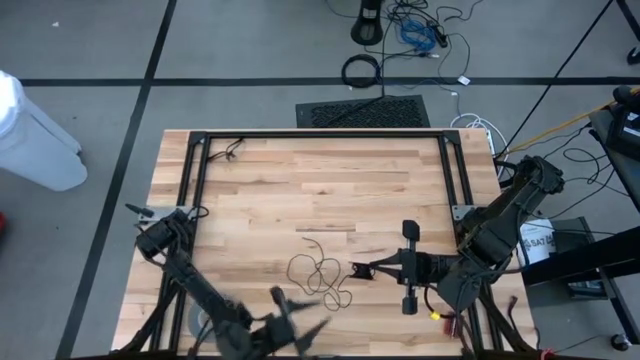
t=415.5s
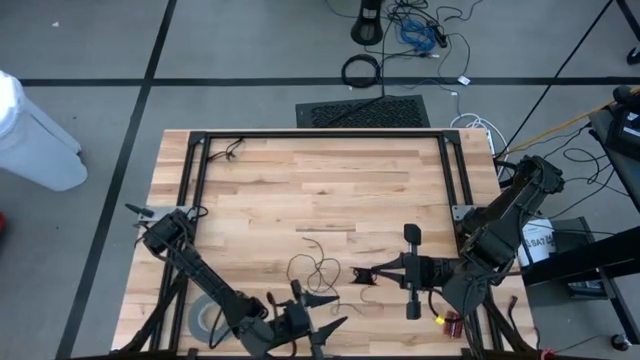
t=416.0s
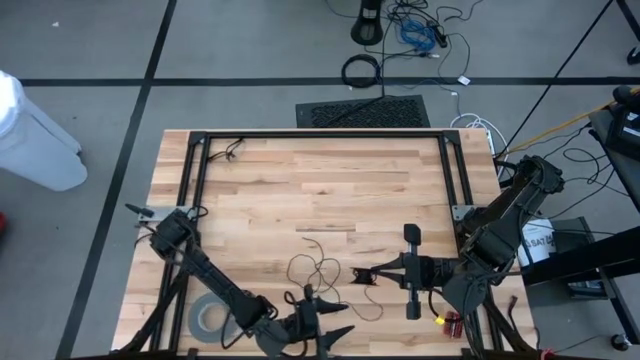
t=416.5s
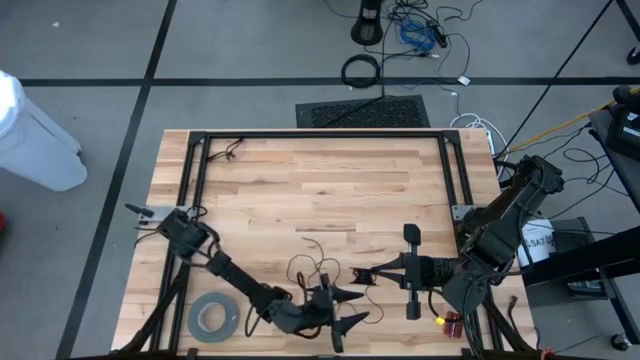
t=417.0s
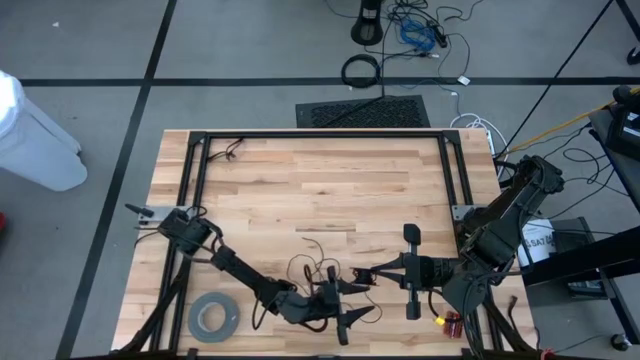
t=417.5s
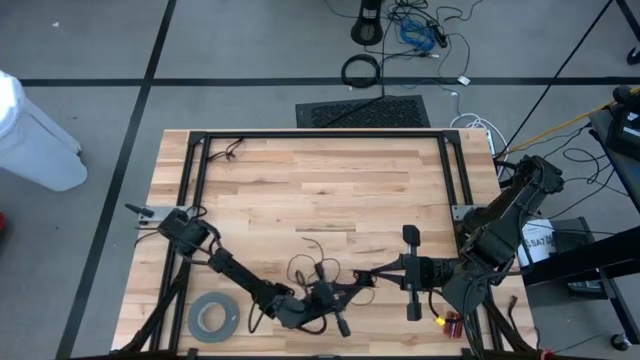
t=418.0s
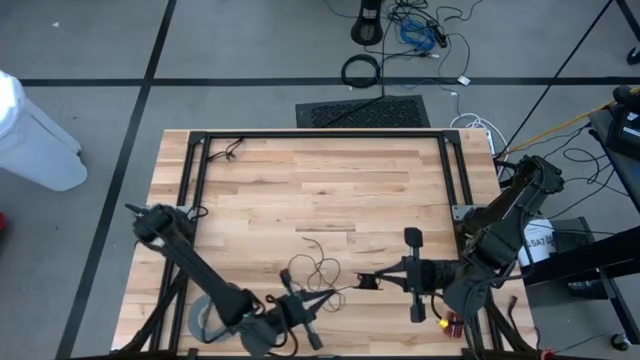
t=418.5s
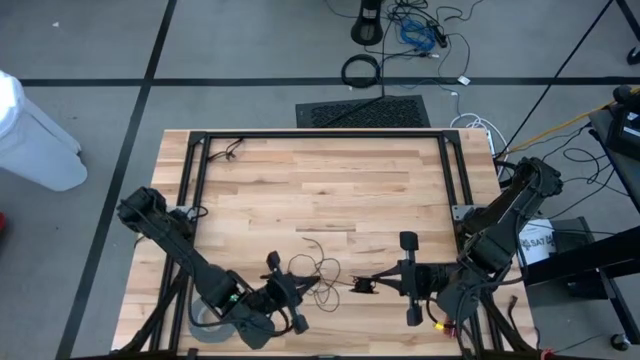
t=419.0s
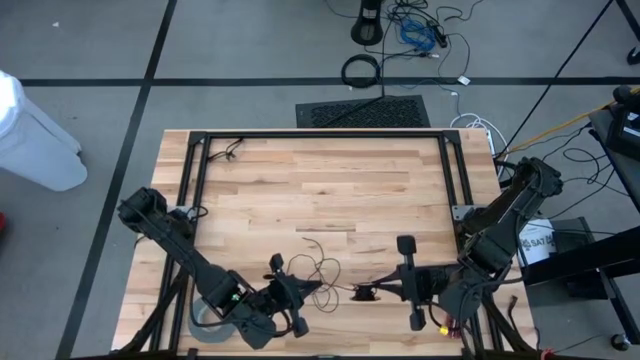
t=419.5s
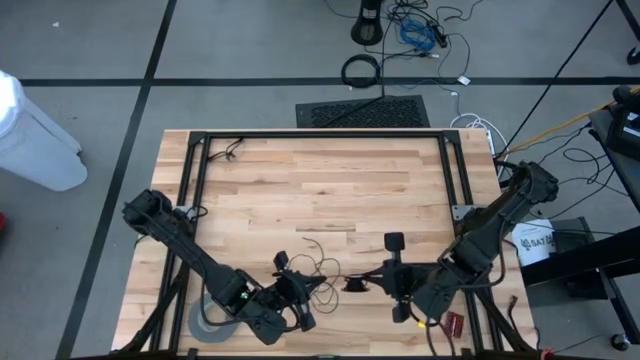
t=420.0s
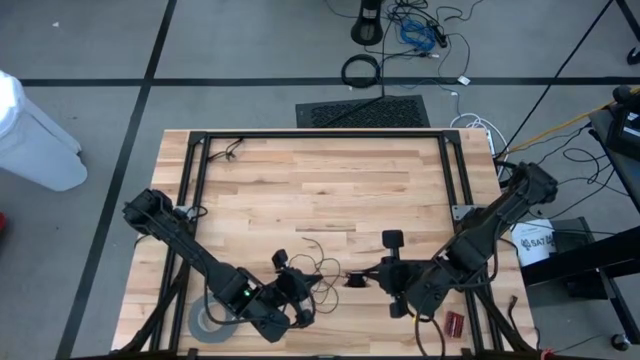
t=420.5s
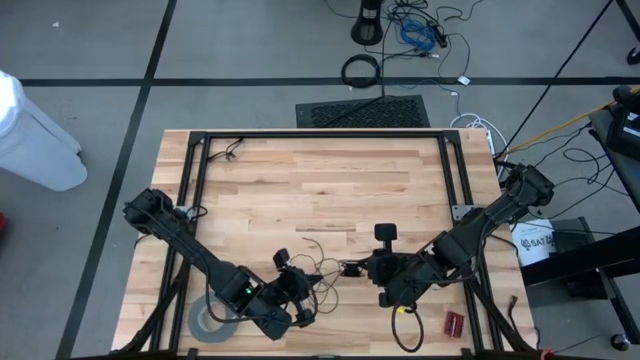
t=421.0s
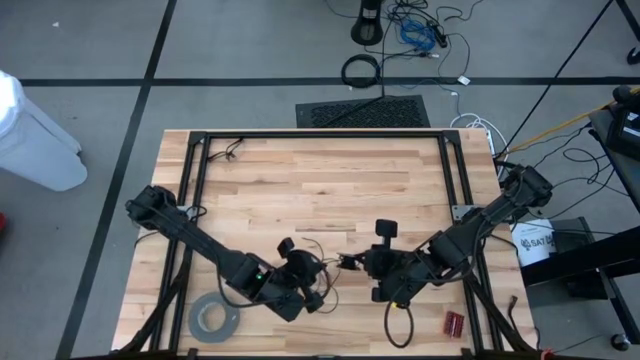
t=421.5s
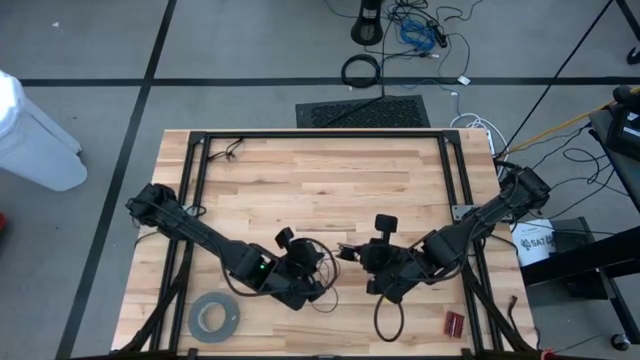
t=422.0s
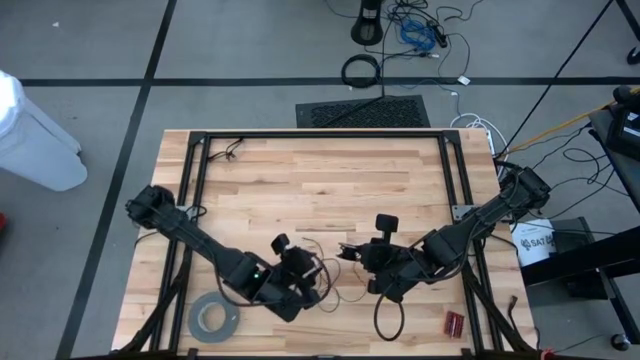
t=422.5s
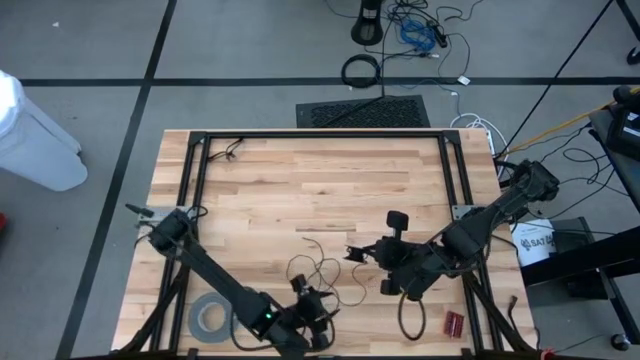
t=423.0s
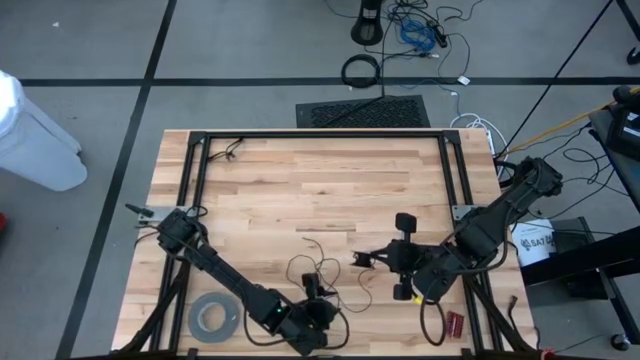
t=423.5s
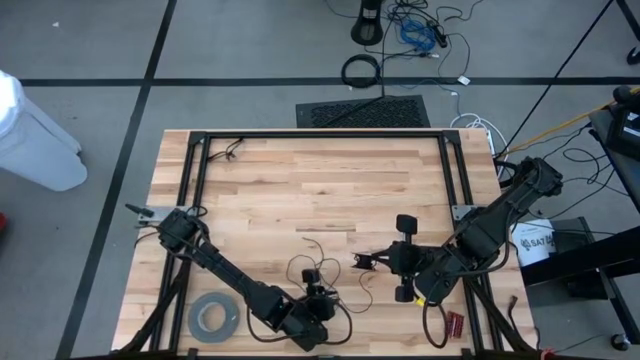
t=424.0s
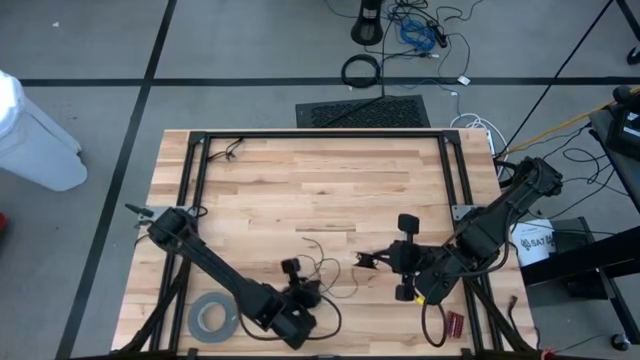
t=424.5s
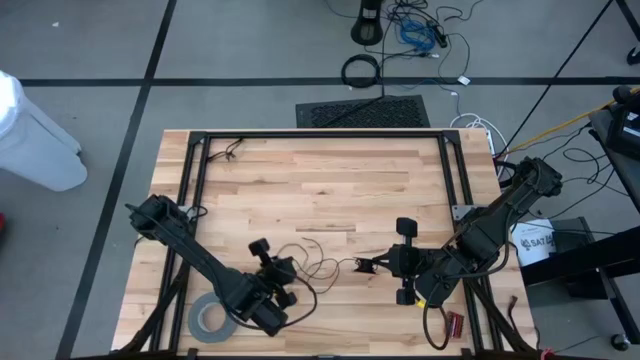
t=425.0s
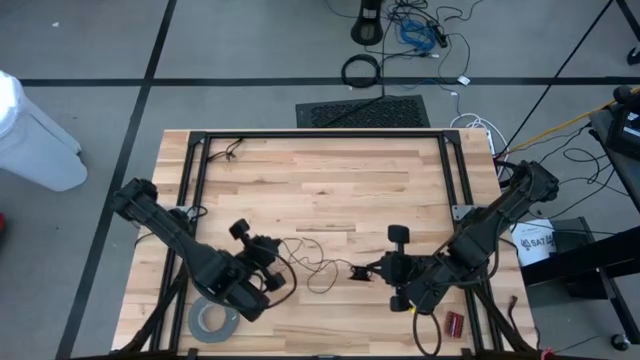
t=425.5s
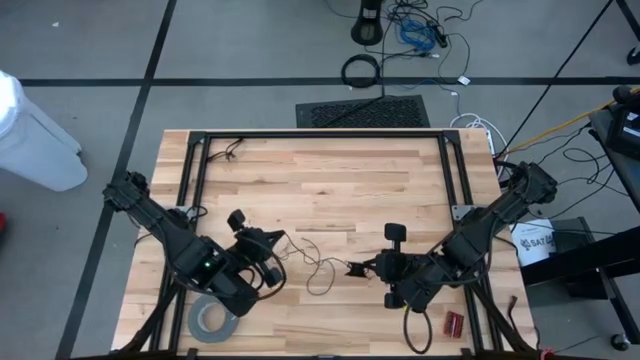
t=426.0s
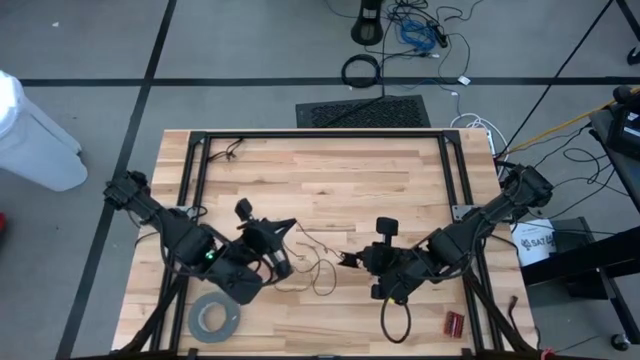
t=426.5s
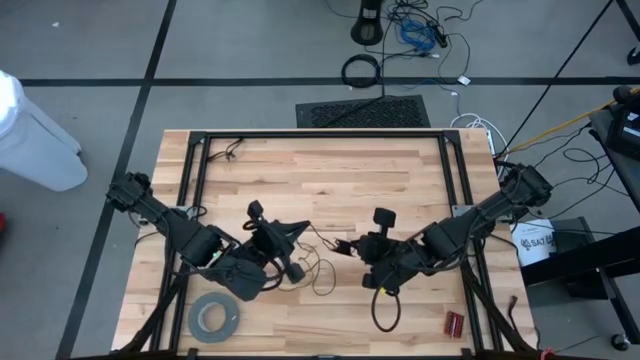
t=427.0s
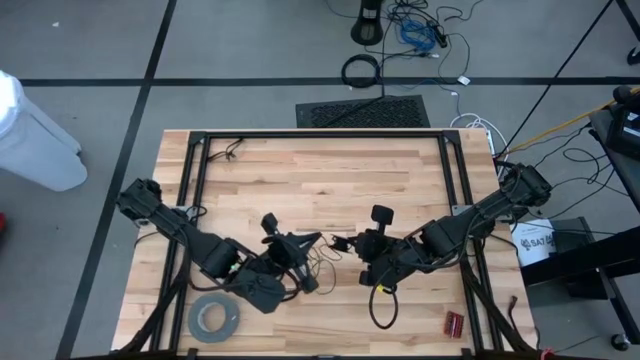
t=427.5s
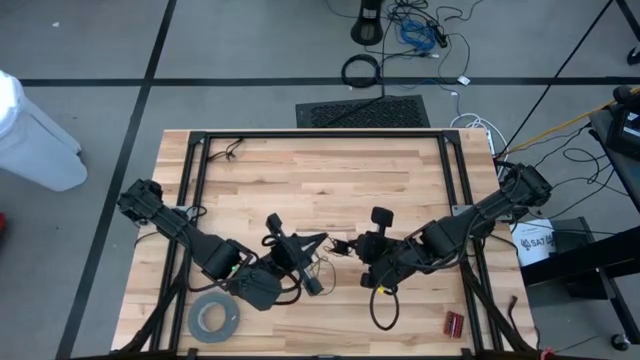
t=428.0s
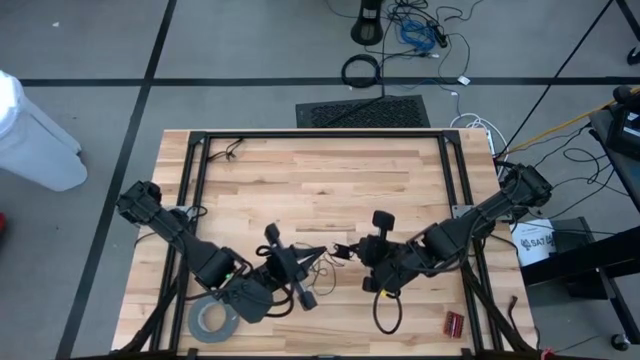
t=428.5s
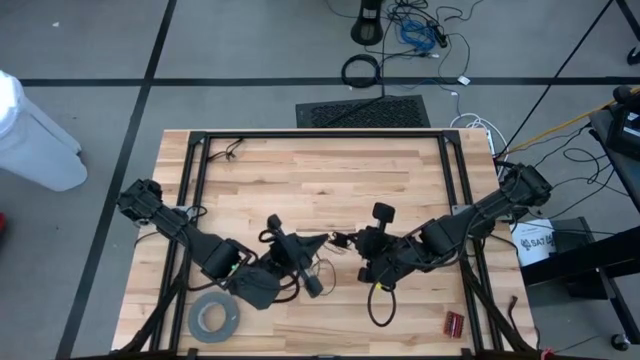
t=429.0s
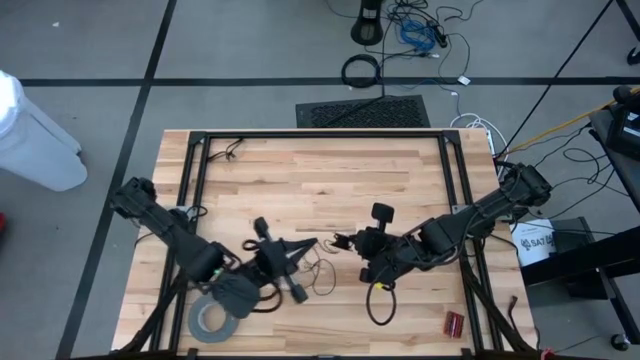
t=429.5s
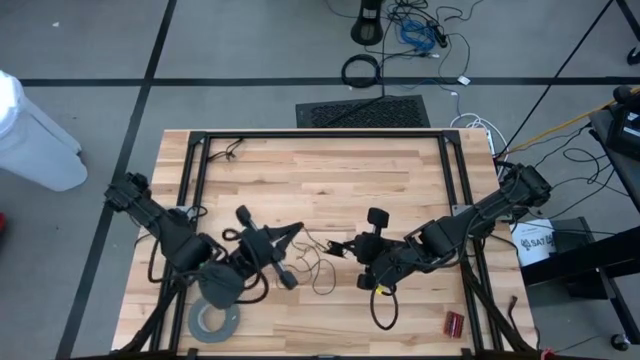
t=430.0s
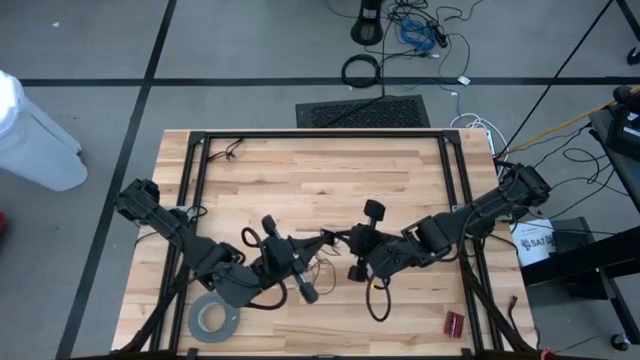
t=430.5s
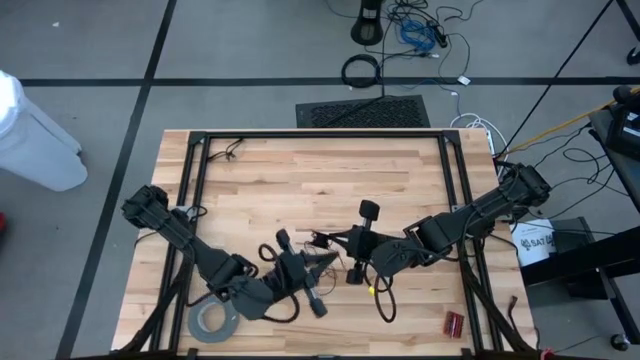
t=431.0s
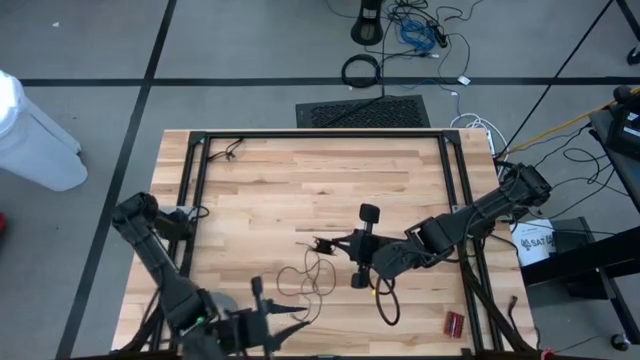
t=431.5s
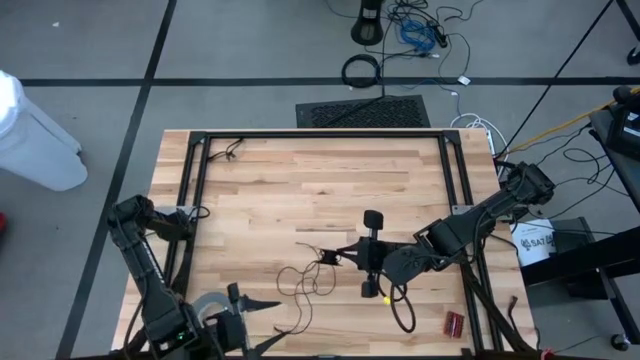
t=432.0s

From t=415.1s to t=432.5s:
Task: Coil cords
Coil the black wire onto the spool

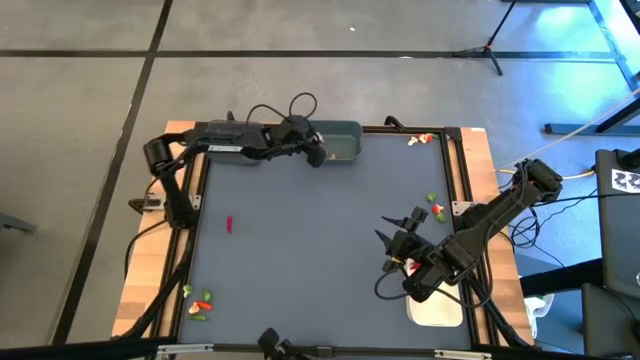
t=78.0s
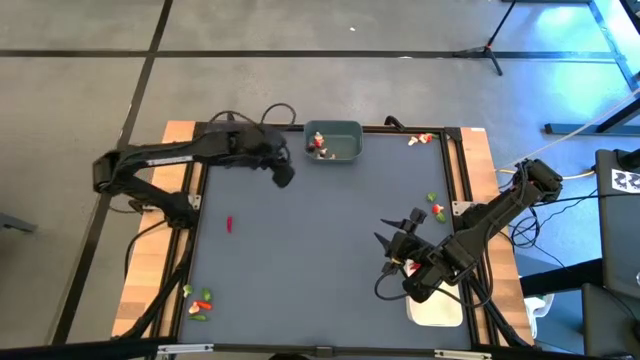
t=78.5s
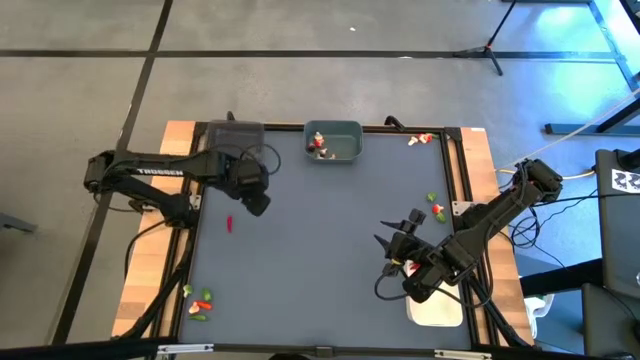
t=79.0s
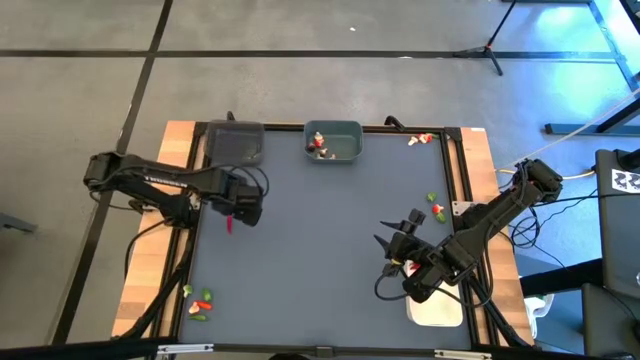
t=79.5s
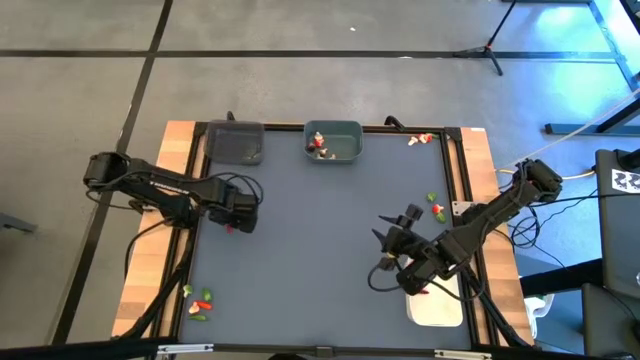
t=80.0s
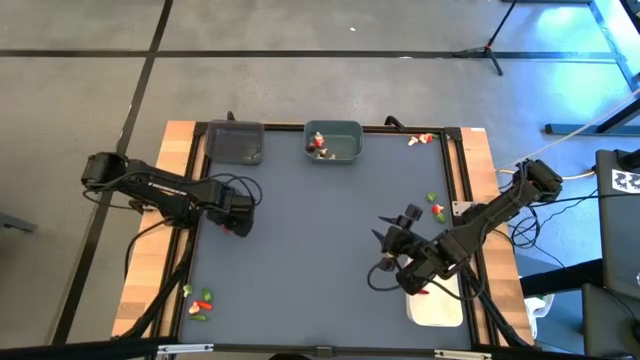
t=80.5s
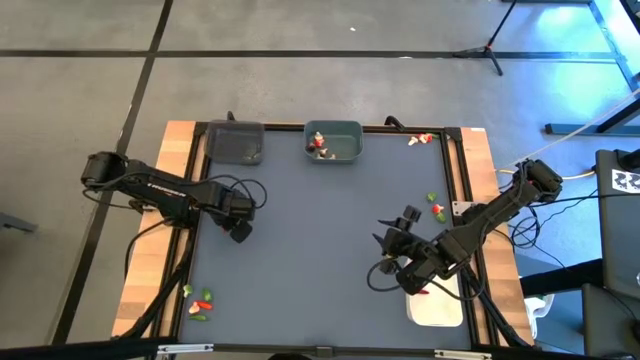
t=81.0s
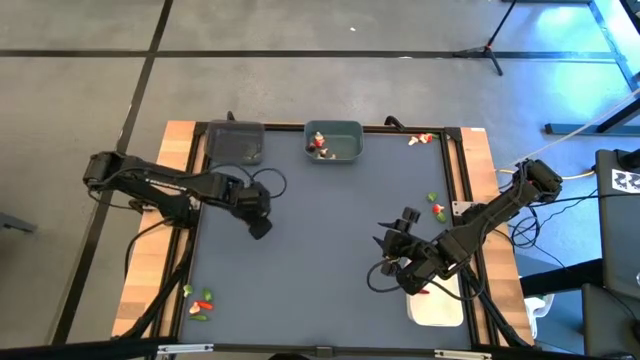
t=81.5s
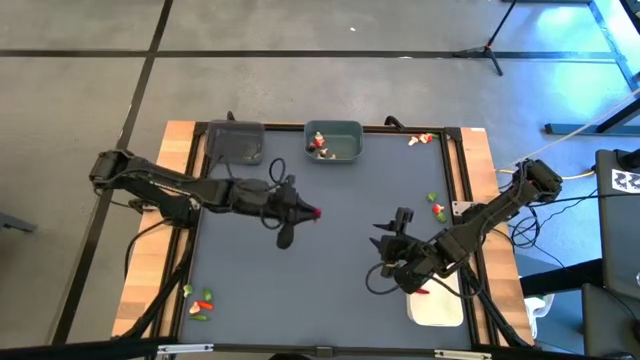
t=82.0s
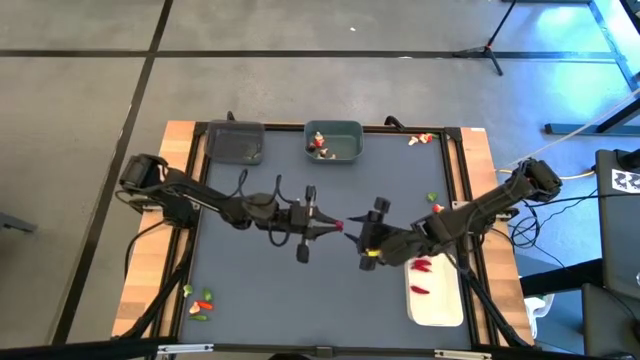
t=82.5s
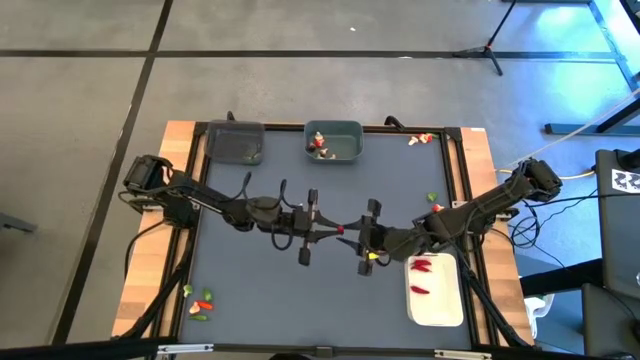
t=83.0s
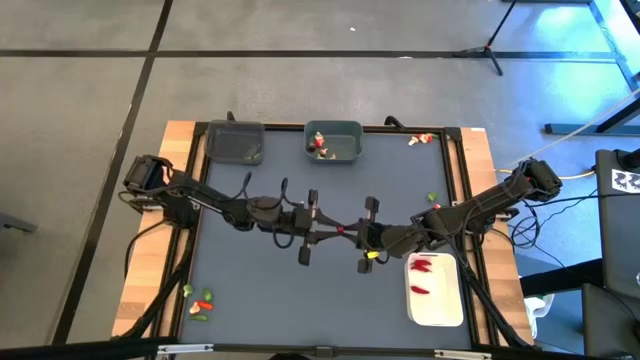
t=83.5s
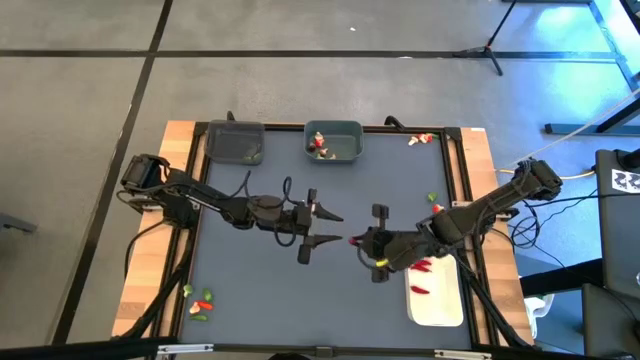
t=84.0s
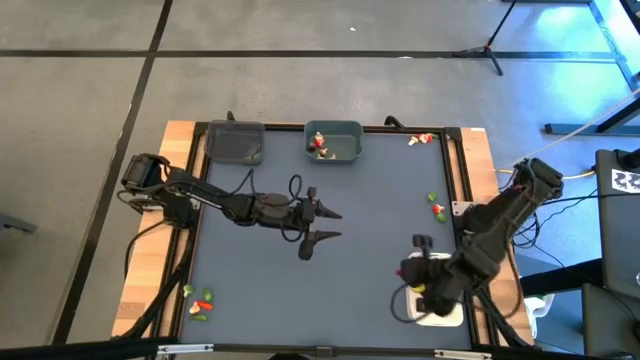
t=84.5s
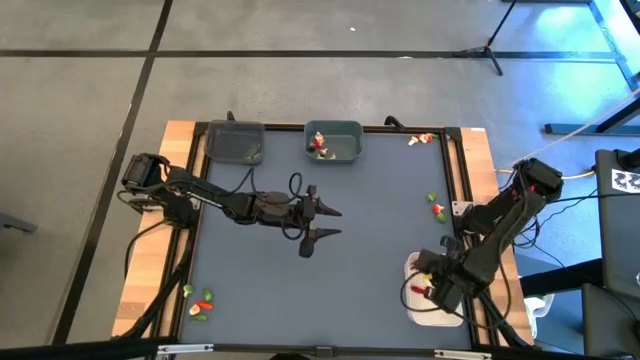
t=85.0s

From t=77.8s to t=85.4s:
Task: Sort produce into baskets
Put the red chili pepper into the white bin
